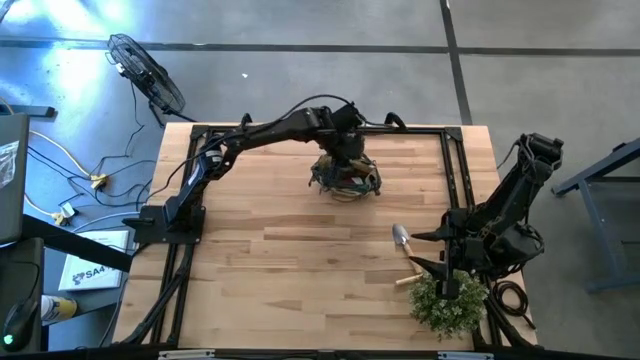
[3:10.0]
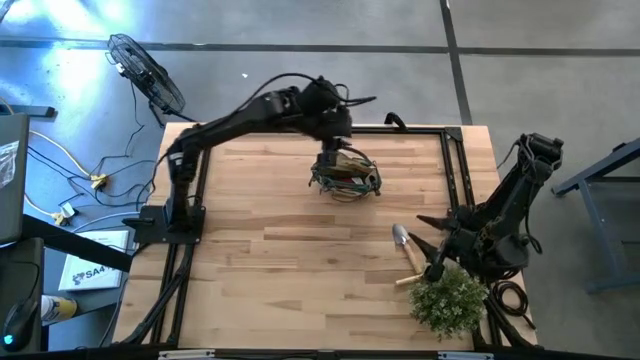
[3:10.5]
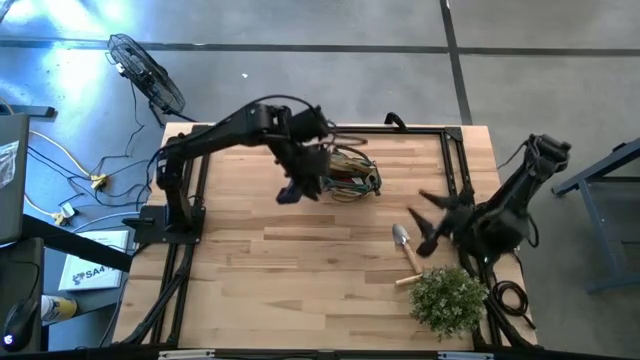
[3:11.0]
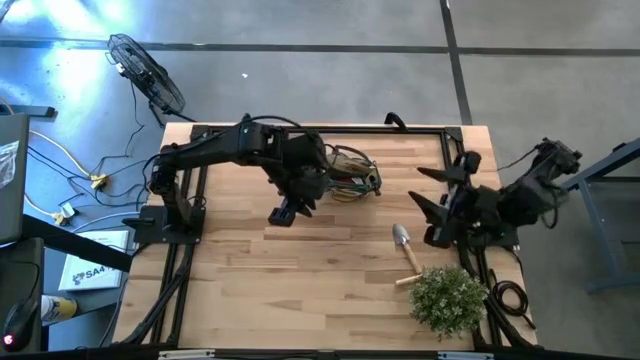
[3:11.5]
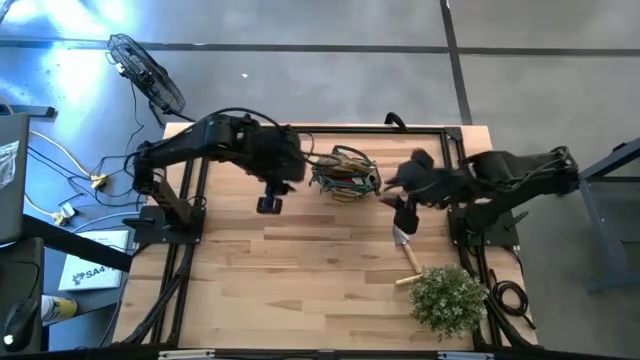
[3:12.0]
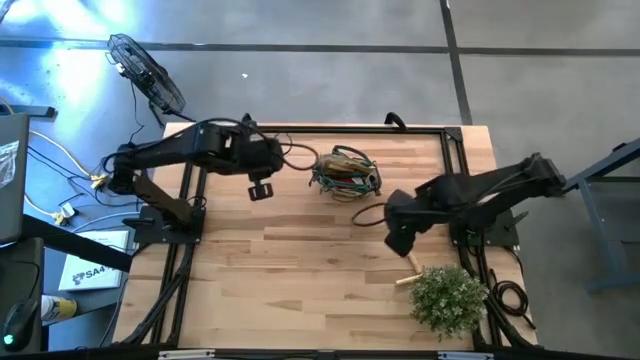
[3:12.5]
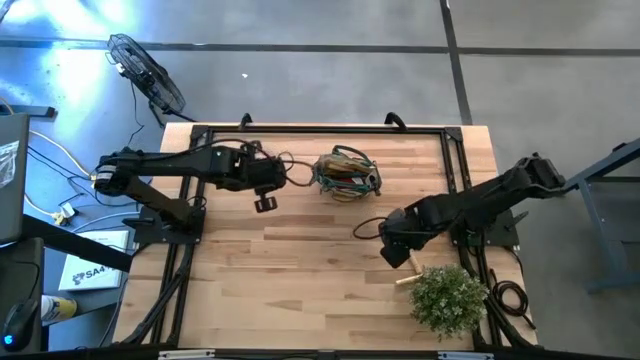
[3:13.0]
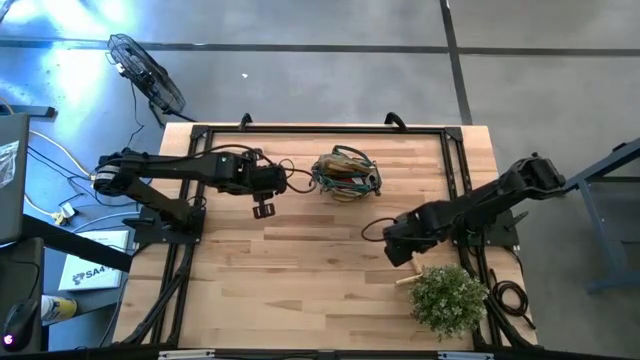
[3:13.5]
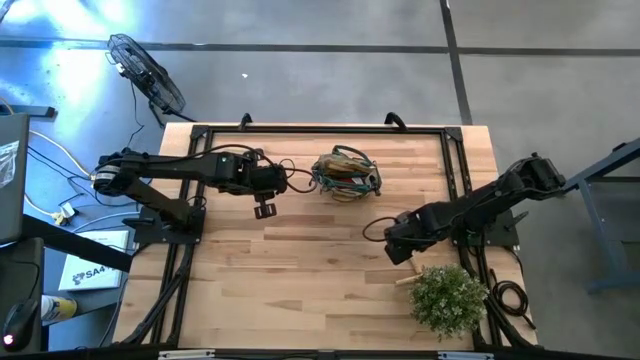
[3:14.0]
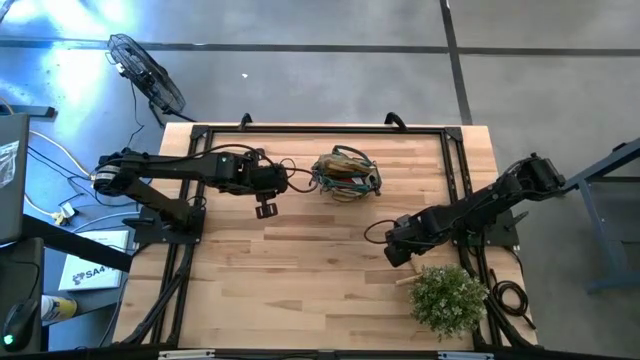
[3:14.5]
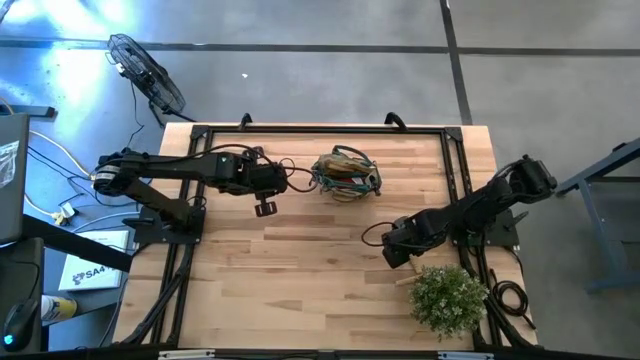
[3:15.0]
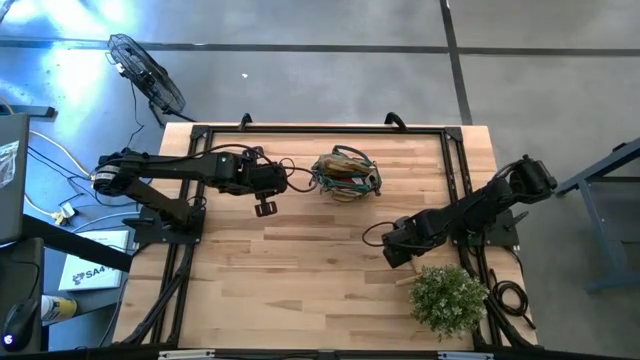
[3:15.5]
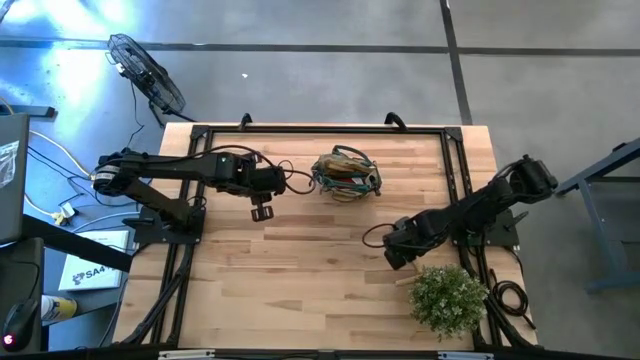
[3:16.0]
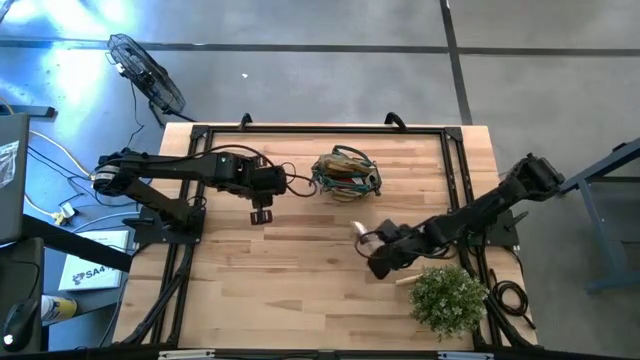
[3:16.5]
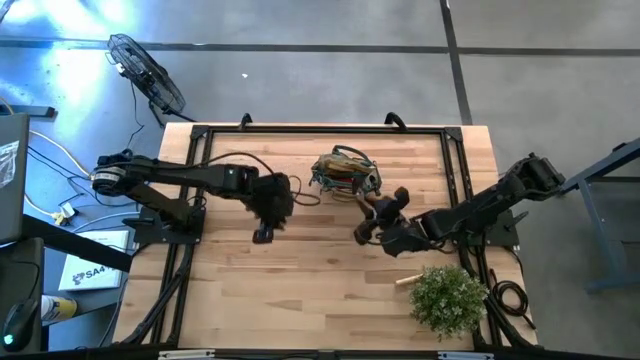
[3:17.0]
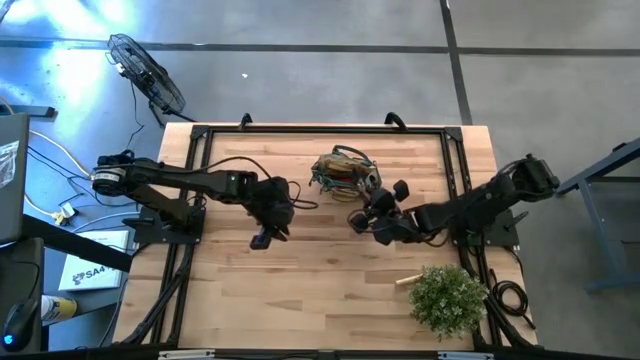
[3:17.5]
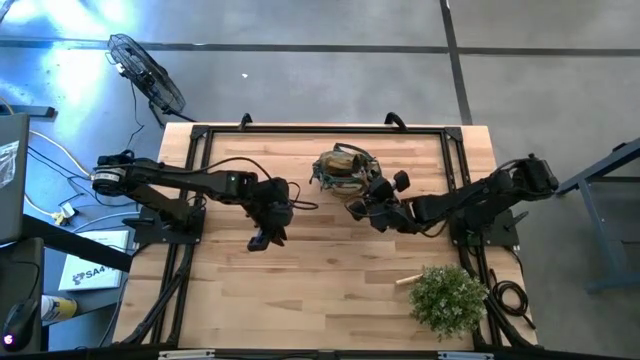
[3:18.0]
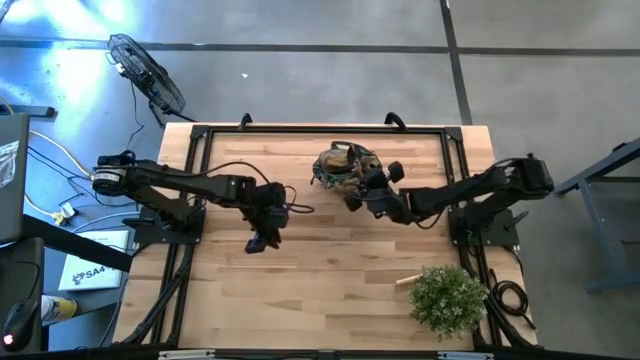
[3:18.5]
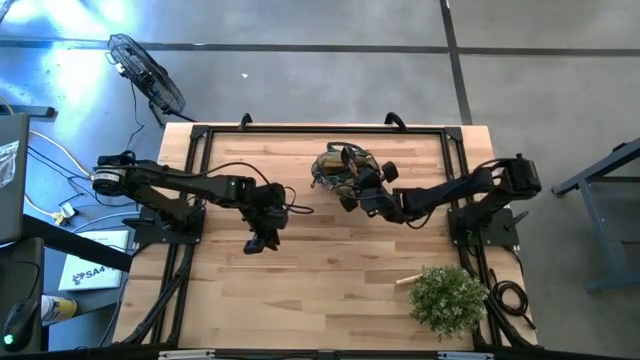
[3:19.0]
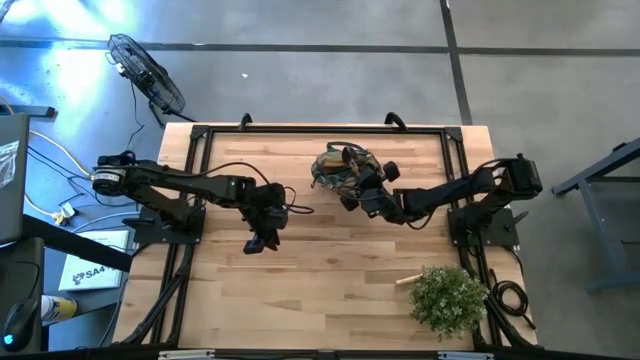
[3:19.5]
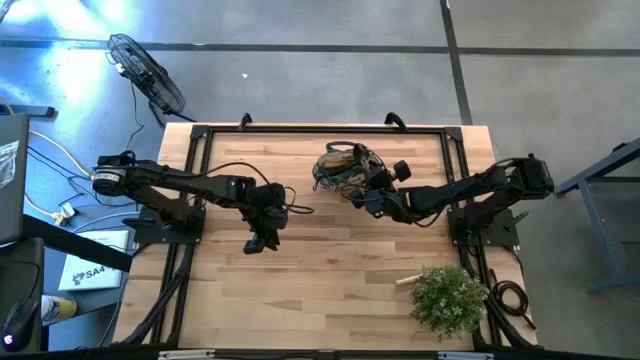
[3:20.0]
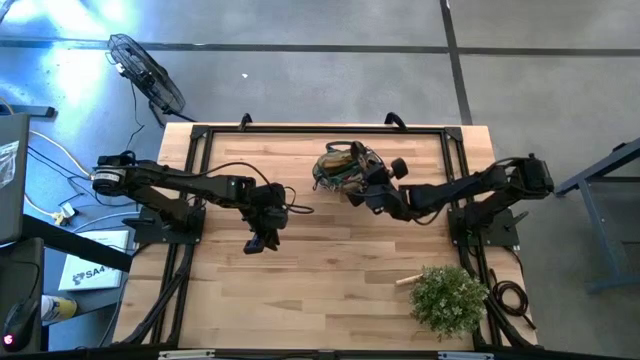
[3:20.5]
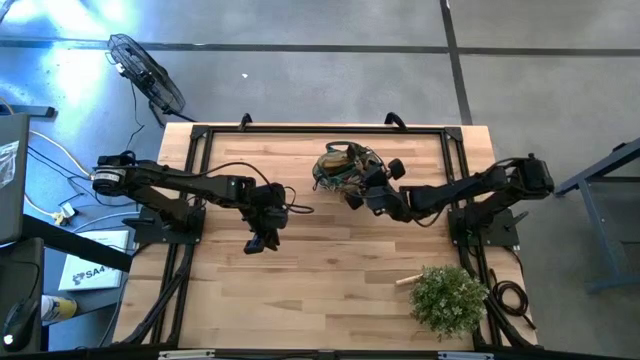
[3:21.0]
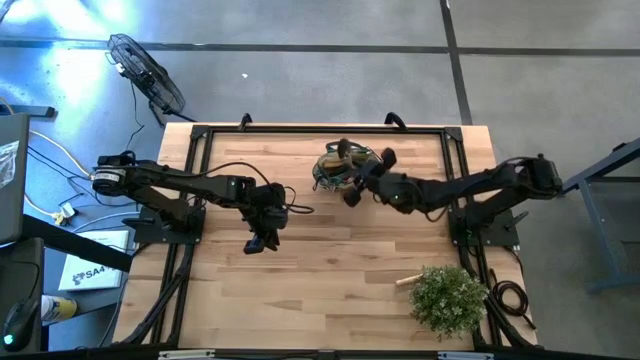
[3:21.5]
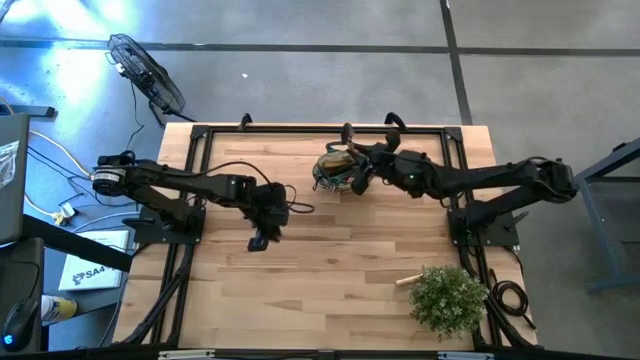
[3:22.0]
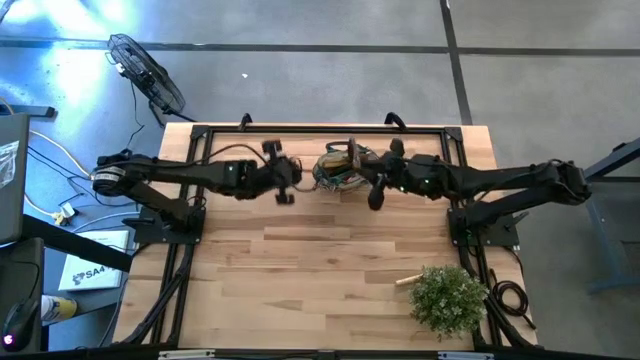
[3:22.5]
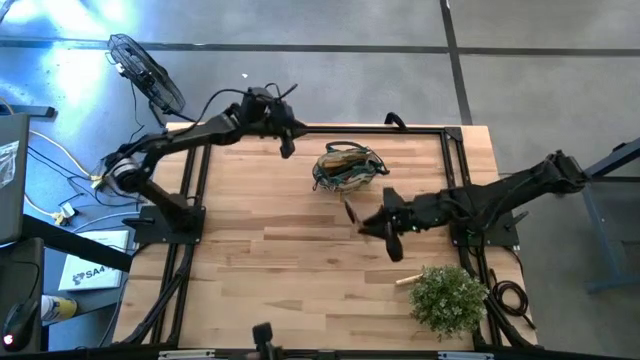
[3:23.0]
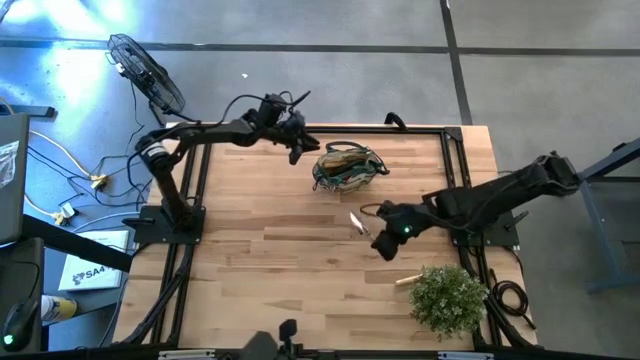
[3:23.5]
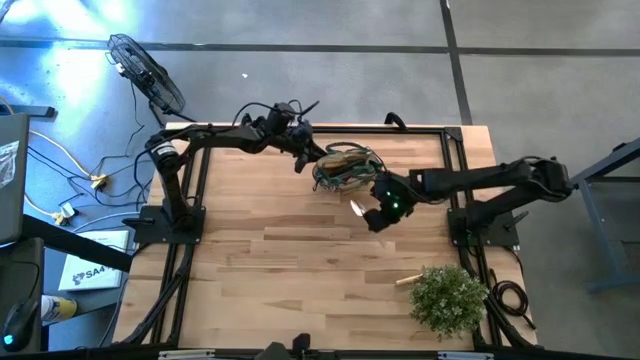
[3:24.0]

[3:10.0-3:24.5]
Task: Pick & Place Garden tools in Gardening bag
Put the top brown trowel into the light brown gardening bag

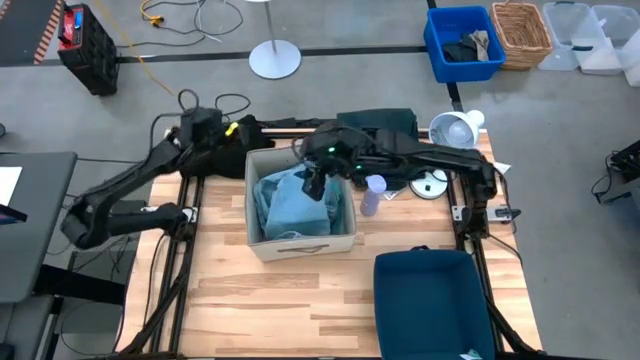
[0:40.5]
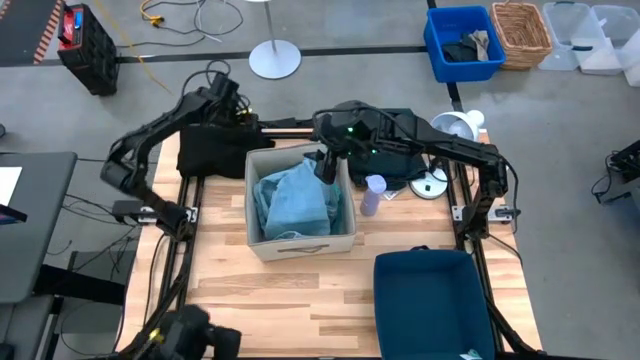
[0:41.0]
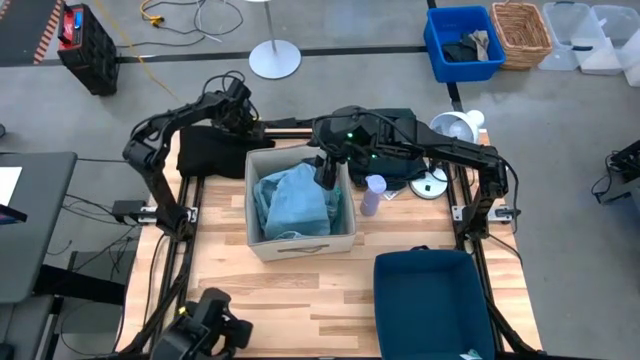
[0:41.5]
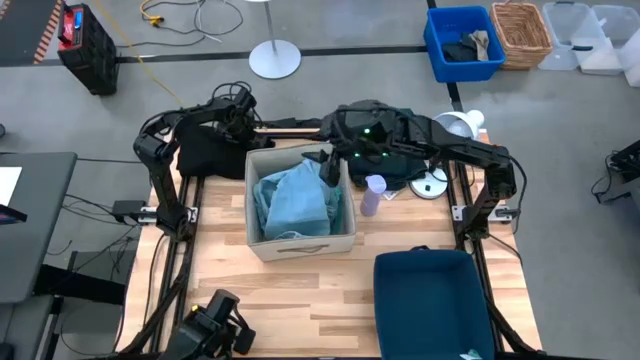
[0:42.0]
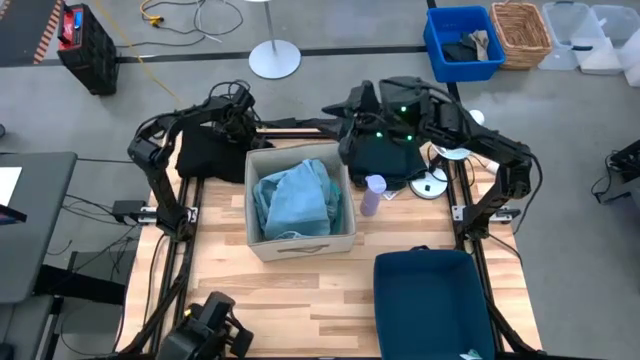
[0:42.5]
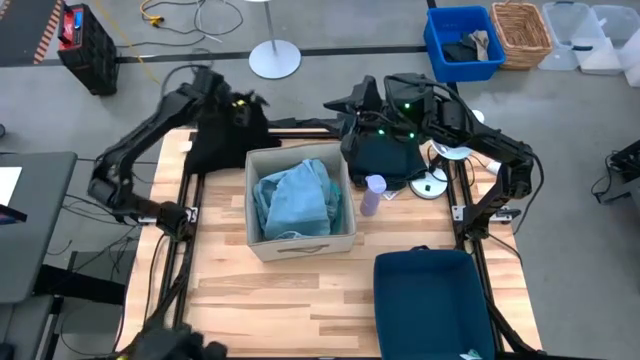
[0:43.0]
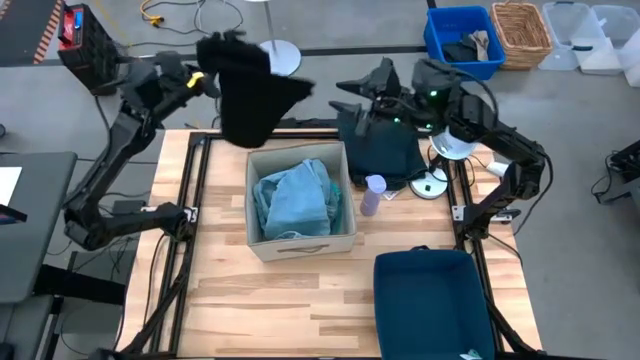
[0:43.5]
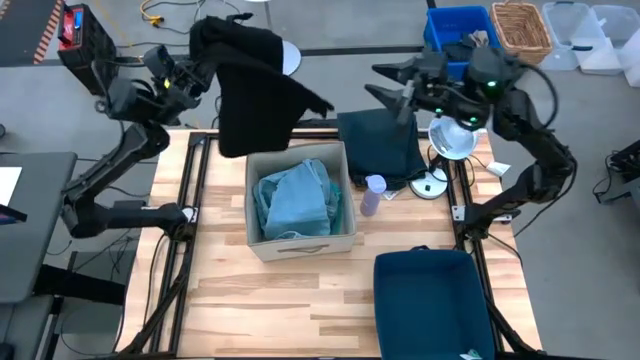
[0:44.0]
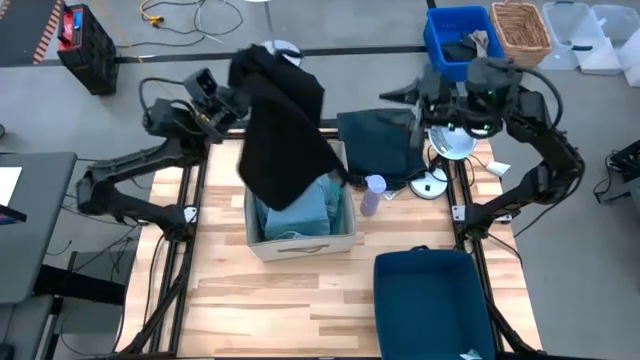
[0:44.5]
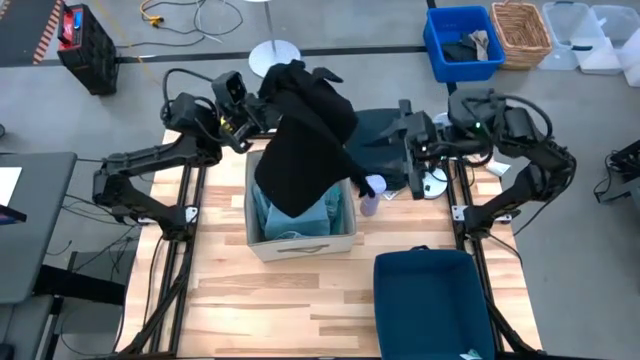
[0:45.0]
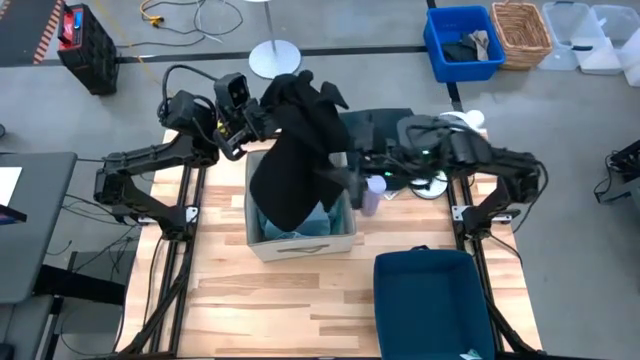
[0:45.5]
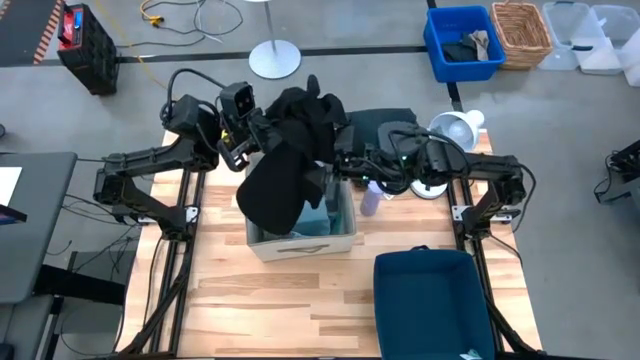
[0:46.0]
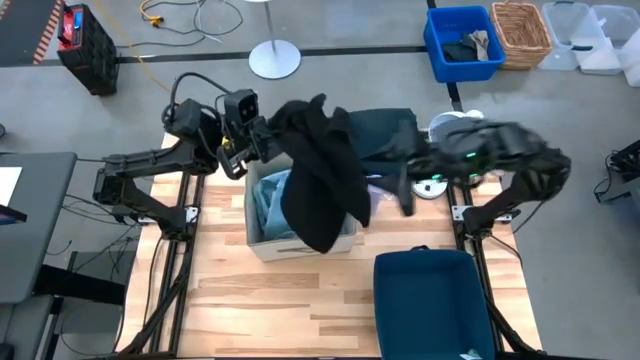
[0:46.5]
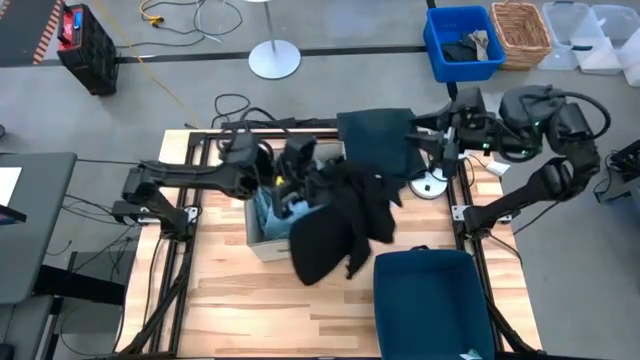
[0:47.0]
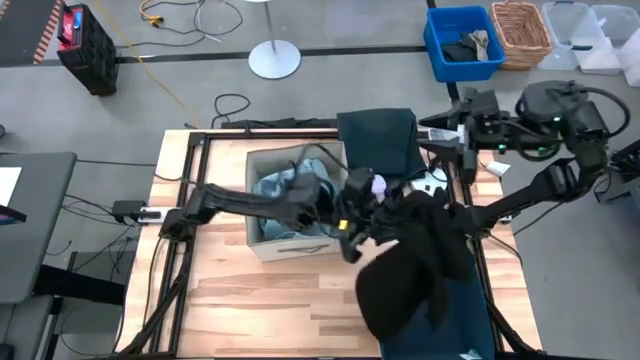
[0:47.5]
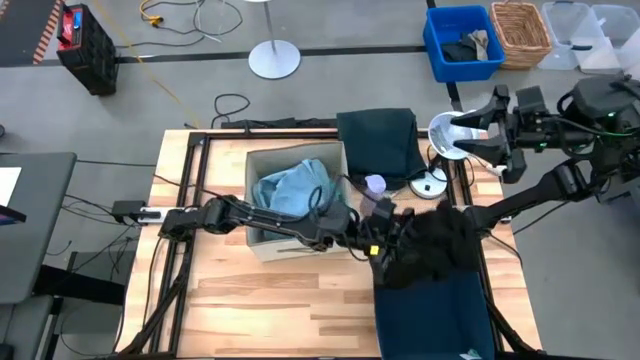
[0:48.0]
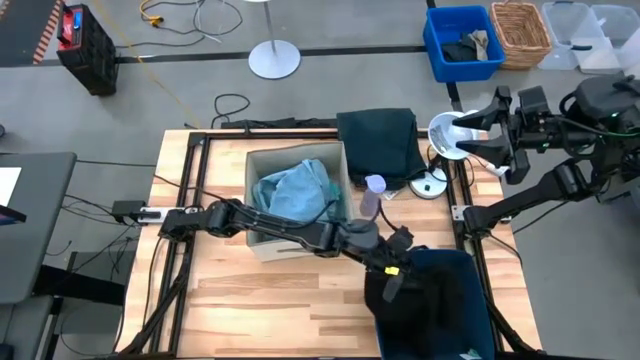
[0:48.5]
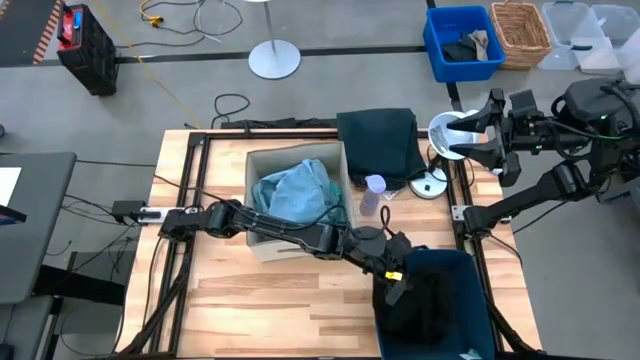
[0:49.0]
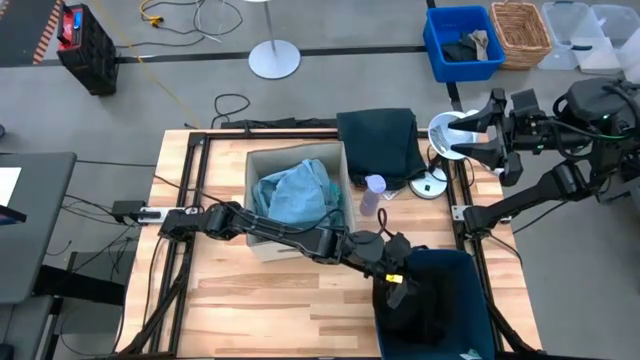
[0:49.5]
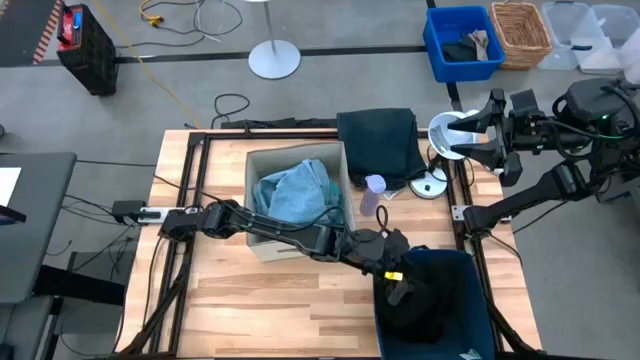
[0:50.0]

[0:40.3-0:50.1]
Task: Sort clothes
Put the black shirt into the blue laundry bin
